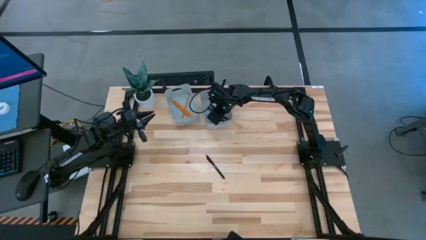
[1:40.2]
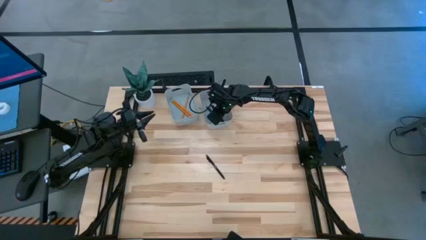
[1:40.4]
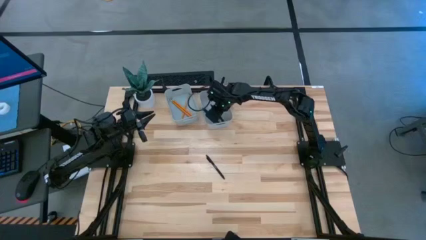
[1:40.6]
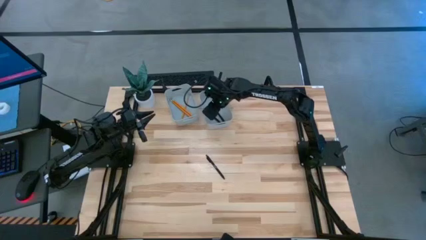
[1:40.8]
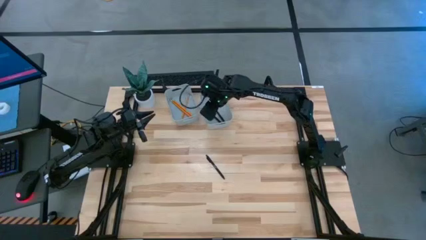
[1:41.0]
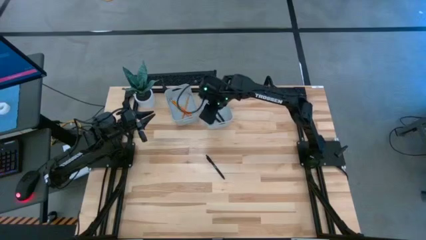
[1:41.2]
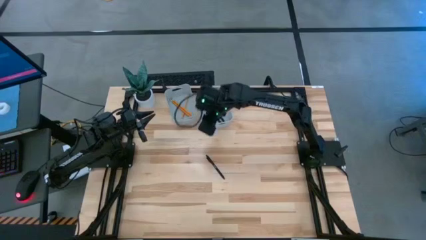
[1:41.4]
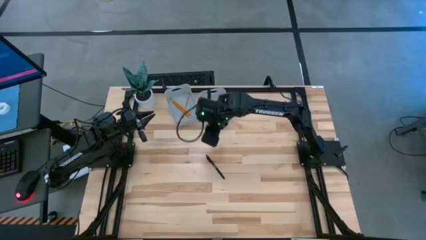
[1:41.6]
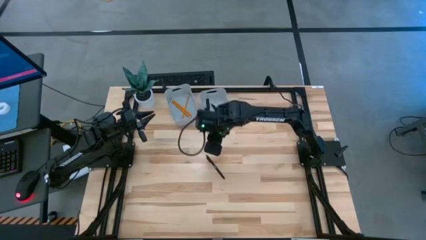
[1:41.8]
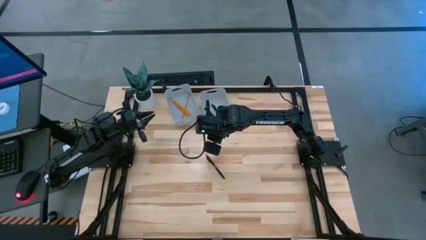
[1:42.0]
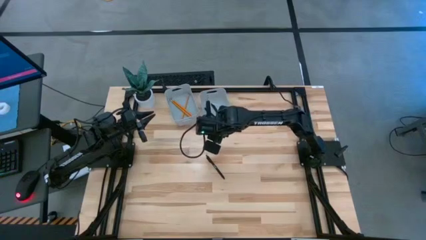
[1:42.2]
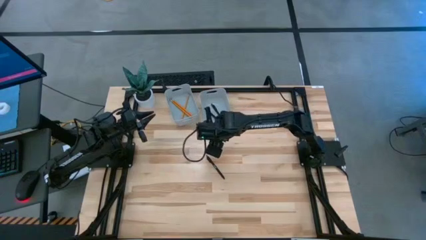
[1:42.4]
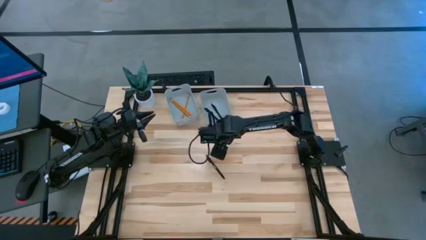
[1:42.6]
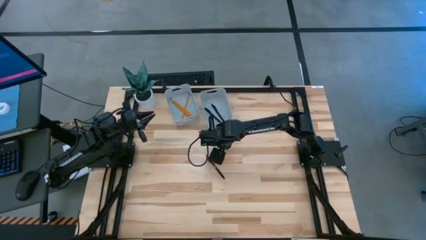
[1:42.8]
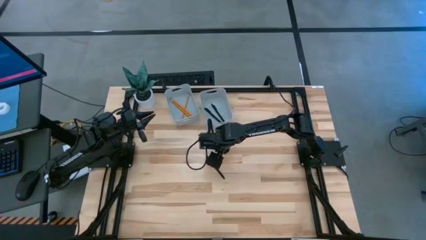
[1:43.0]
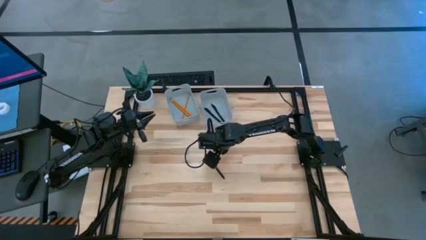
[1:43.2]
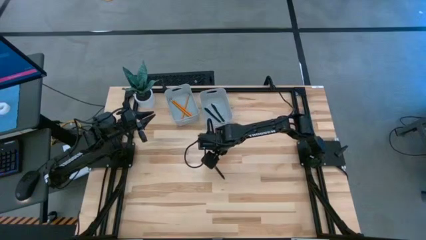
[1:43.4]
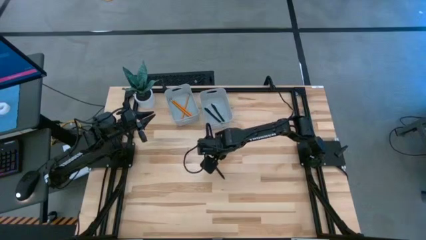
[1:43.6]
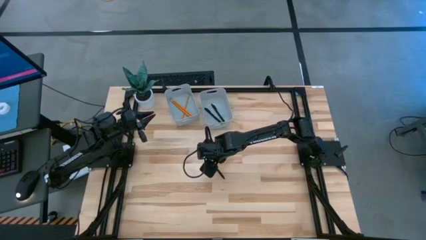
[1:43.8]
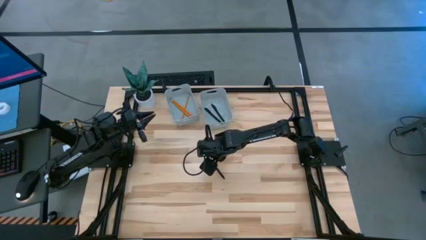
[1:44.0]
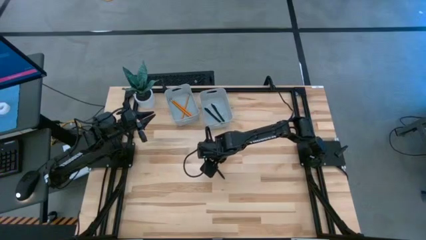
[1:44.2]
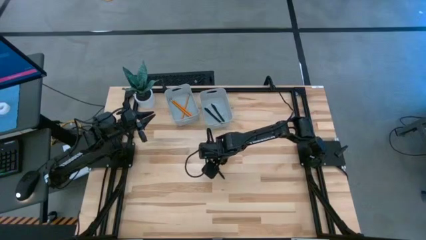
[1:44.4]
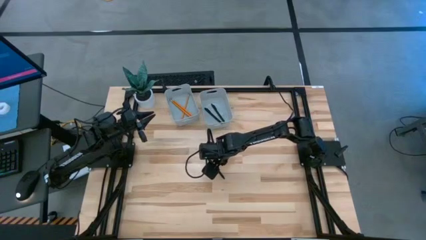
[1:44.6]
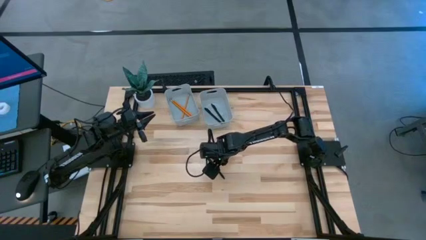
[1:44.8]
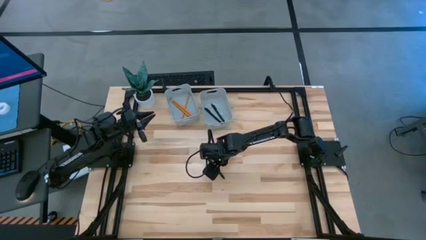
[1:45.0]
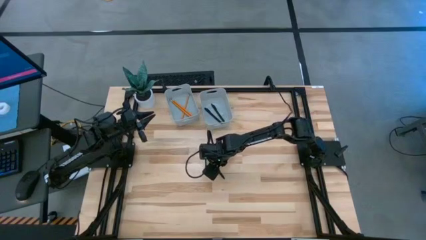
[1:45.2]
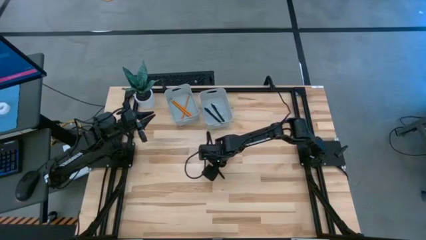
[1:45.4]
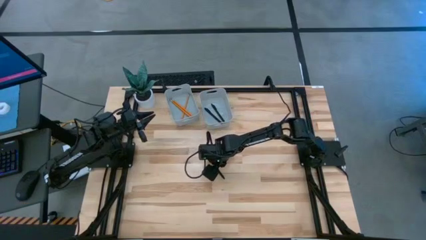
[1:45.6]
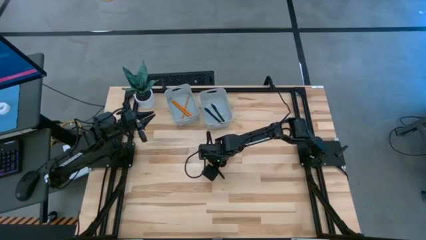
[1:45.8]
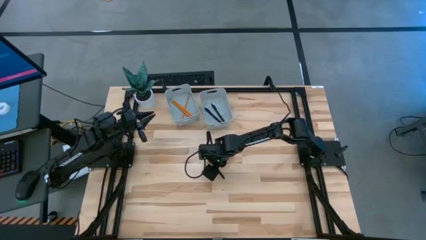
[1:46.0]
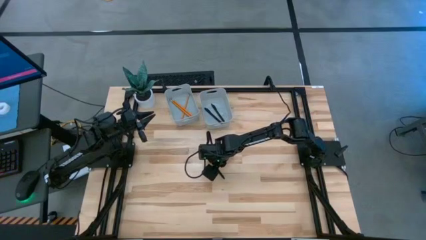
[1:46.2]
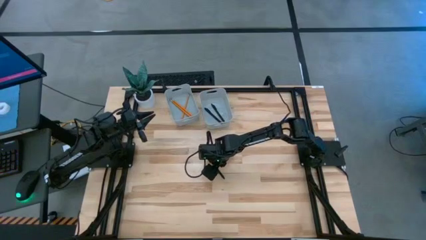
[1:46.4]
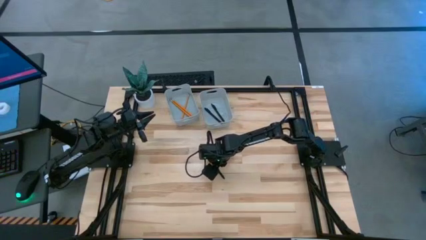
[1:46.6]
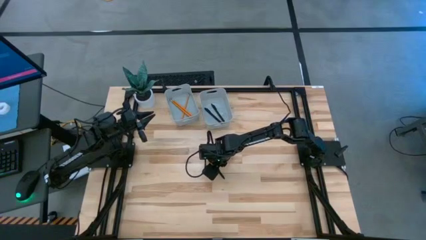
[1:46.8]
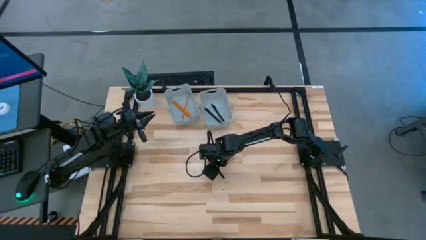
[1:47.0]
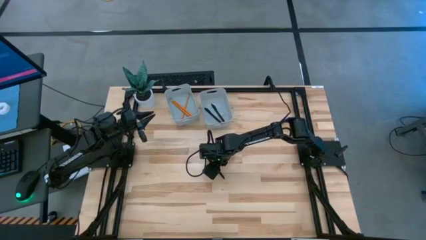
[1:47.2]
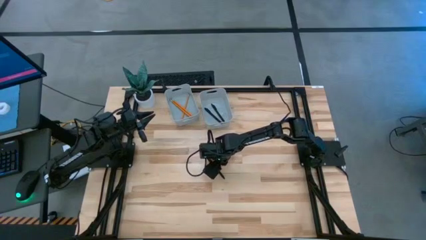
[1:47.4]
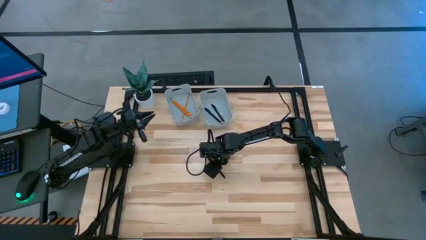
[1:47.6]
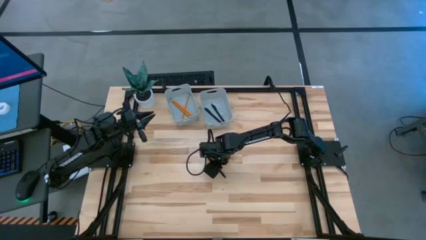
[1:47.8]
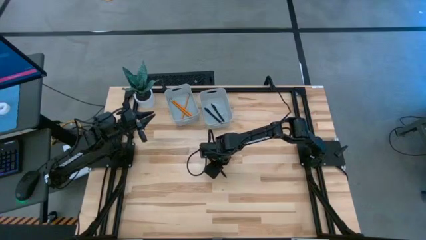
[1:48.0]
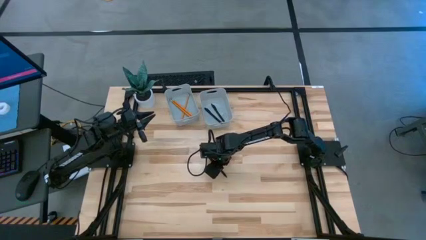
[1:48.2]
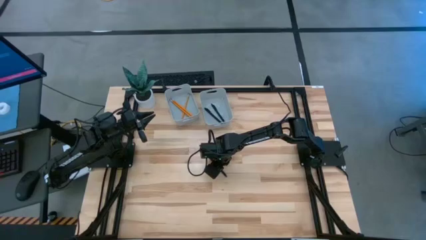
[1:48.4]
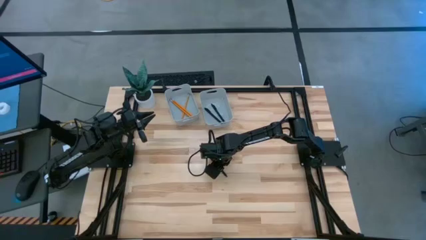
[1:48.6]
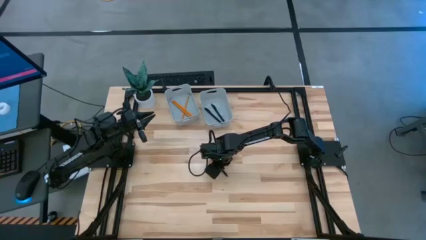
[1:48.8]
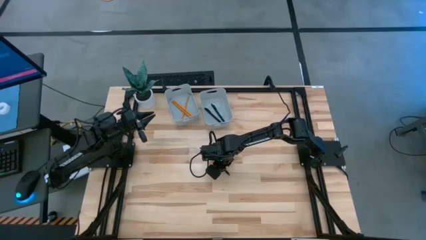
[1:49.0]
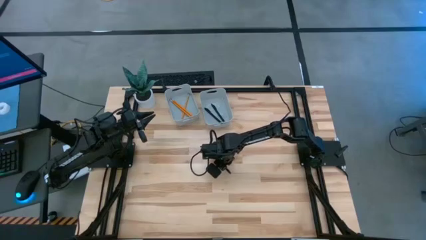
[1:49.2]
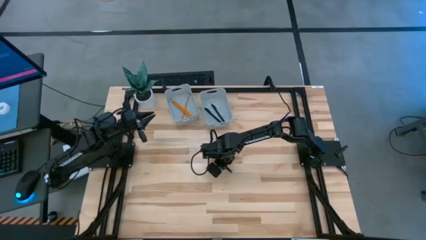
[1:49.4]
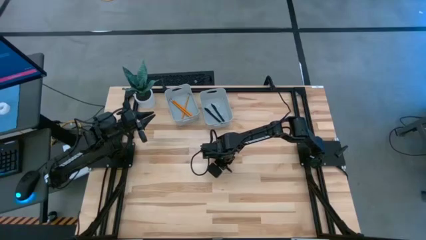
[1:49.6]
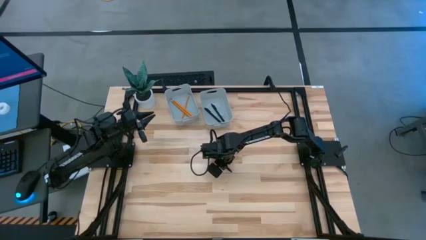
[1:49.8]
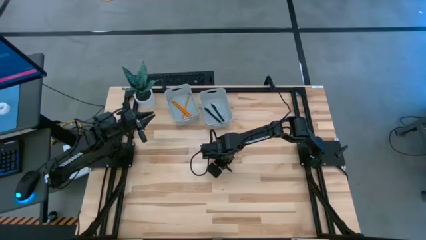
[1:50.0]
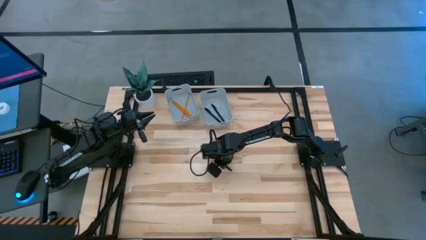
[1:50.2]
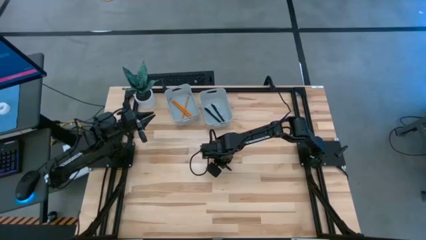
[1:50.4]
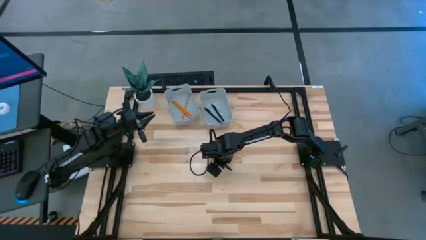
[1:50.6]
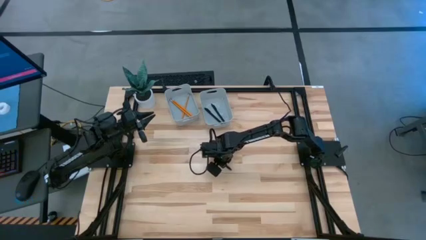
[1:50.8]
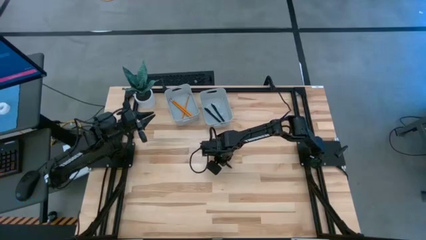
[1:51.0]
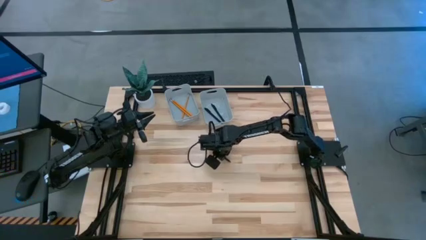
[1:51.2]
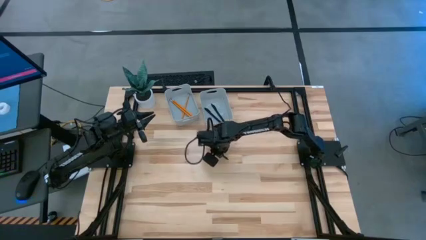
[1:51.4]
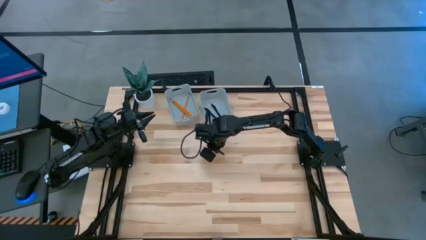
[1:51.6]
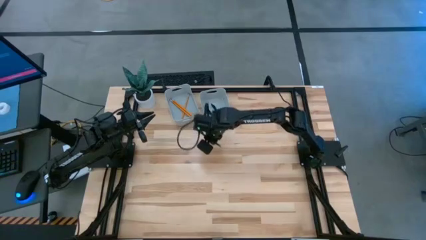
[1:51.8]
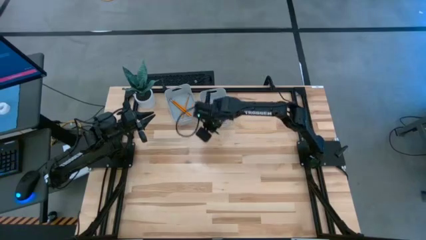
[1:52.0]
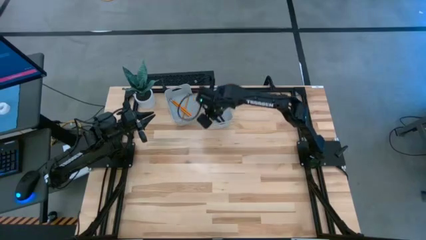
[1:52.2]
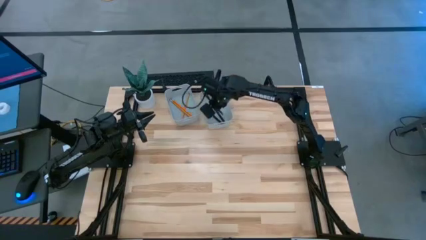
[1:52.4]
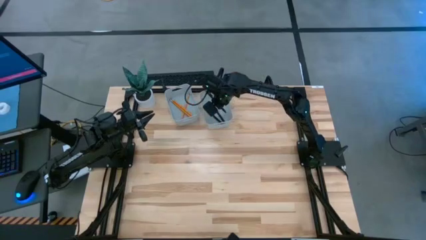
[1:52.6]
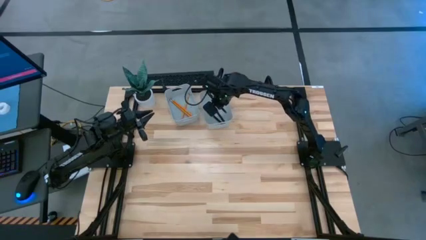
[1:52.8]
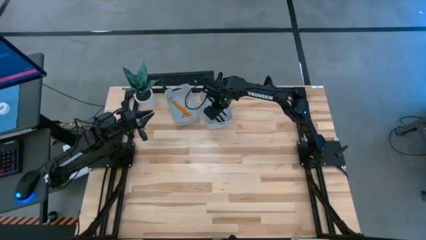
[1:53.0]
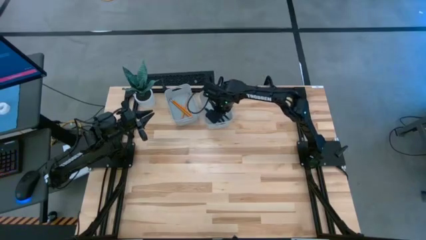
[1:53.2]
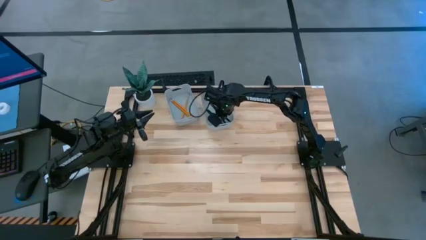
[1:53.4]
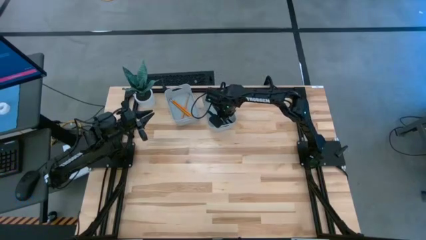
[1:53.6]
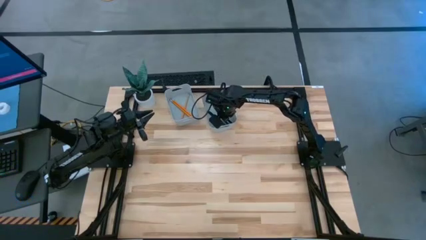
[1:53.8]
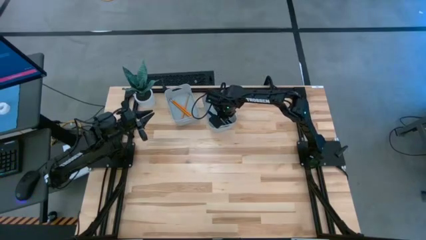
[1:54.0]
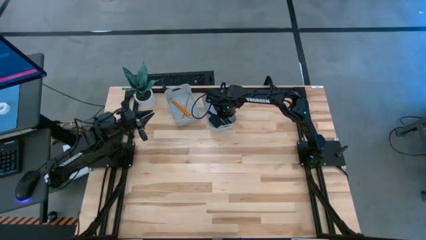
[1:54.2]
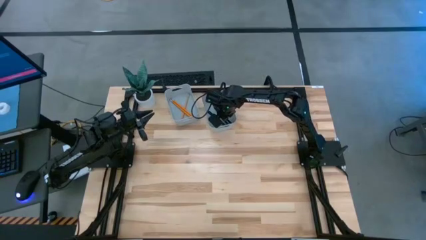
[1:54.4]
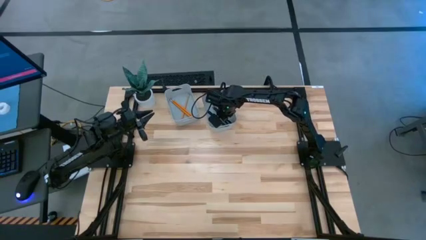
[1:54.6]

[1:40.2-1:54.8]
Task: Sort pens & pencils
Put the black ballpen into the right bin

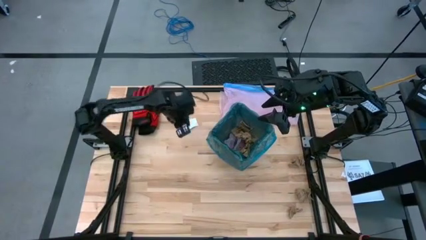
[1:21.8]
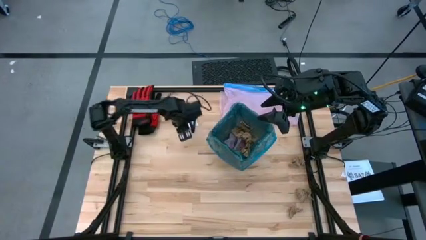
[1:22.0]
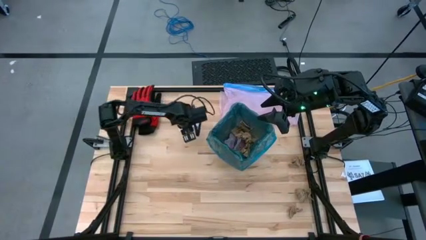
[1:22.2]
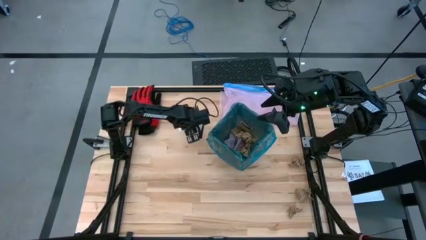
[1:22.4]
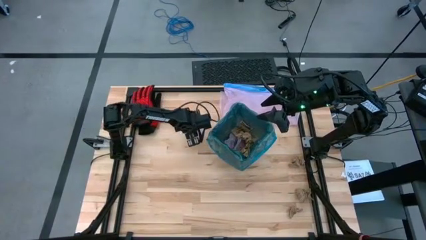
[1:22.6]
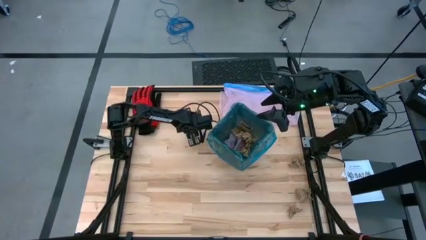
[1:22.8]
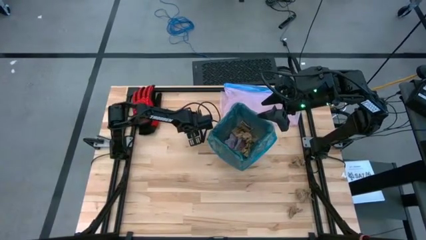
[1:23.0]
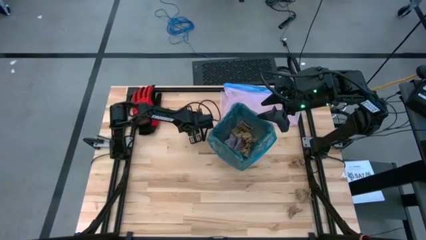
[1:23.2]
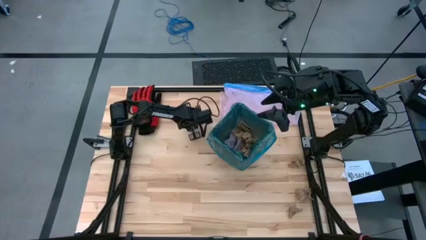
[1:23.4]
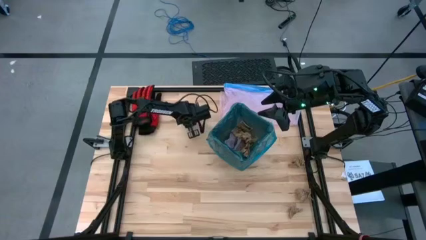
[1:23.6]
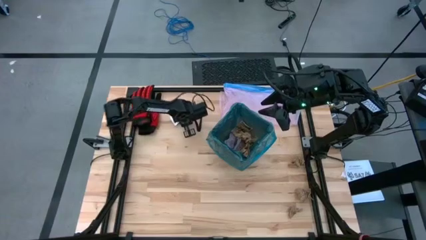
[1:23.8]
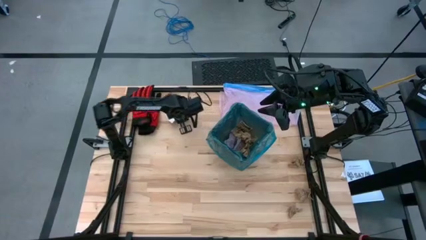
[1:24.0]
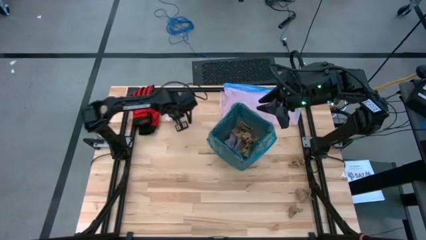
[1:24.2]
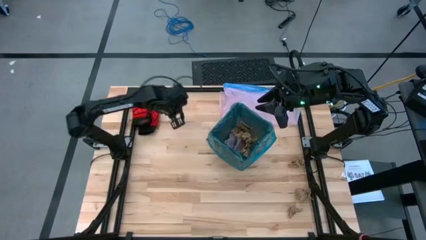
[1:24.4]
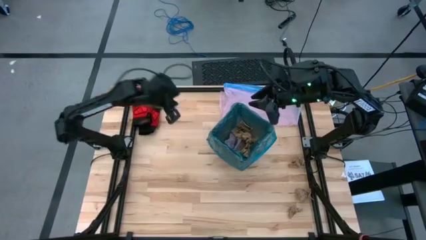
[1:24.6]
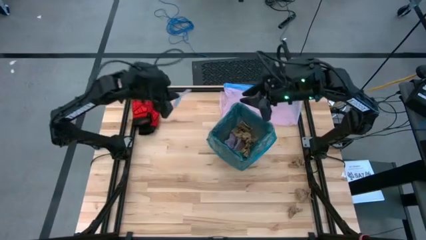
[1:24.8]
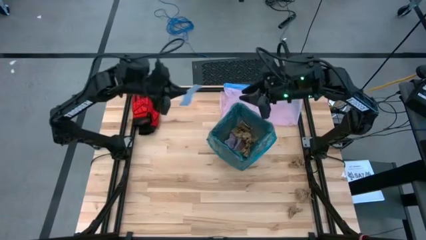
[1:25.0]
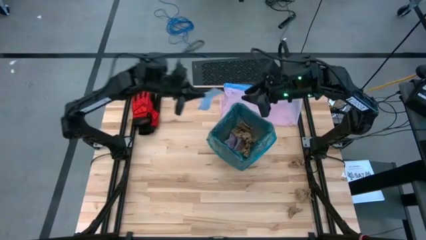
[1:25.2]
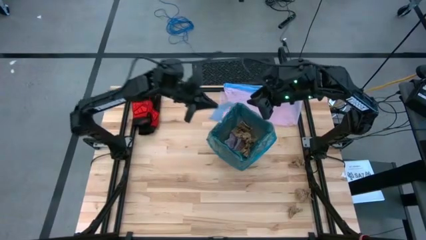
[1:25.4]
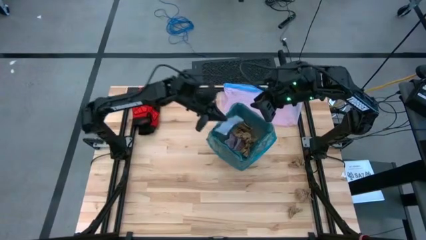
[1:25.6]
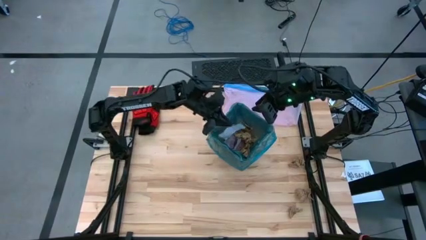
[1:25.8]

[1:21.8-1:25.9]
Task: place trash/remove bag and relplace
Put the piece of white cardboard into the black trash bin
